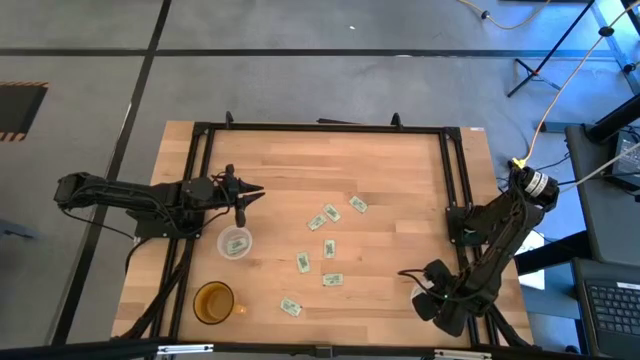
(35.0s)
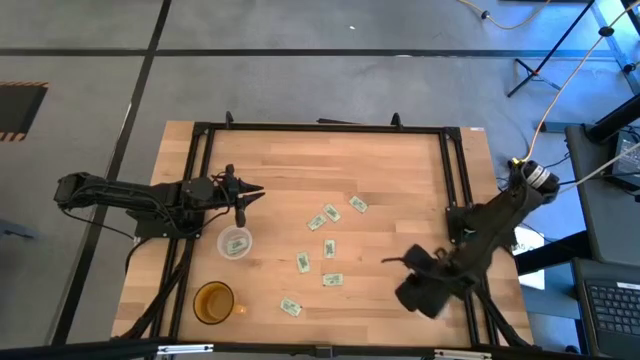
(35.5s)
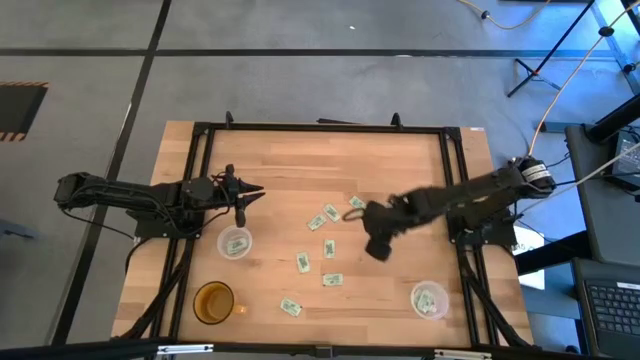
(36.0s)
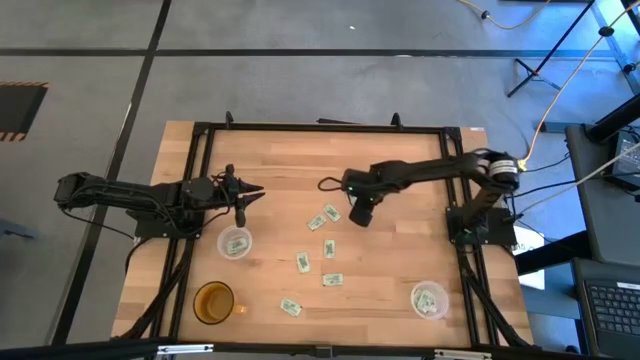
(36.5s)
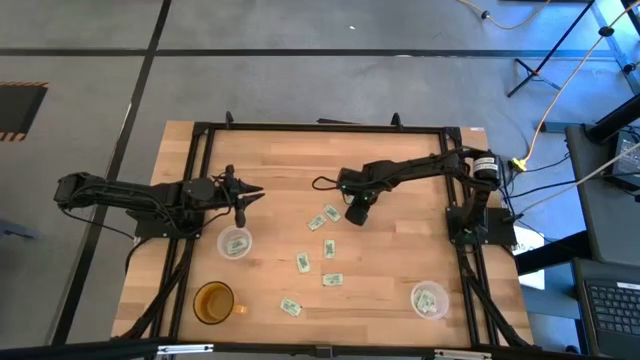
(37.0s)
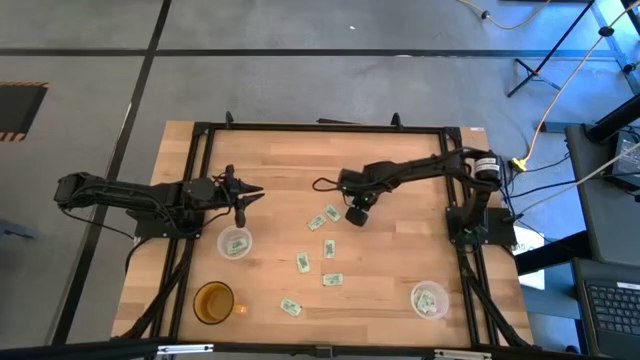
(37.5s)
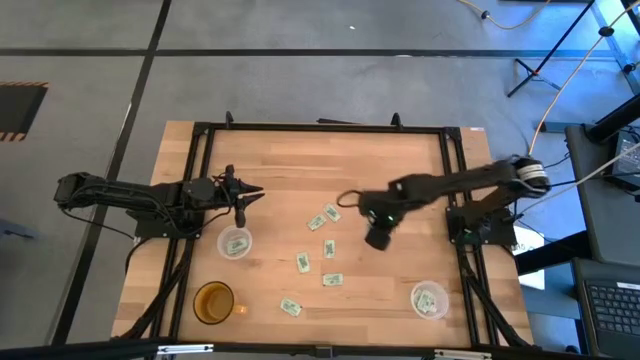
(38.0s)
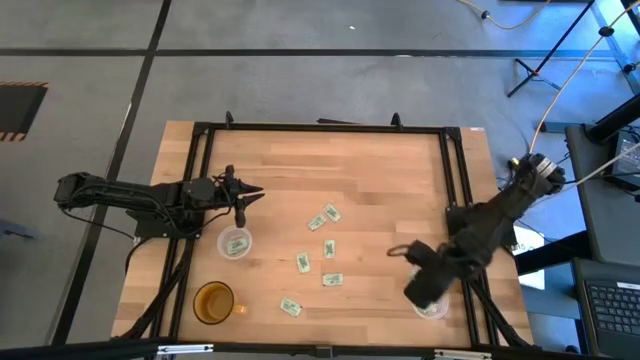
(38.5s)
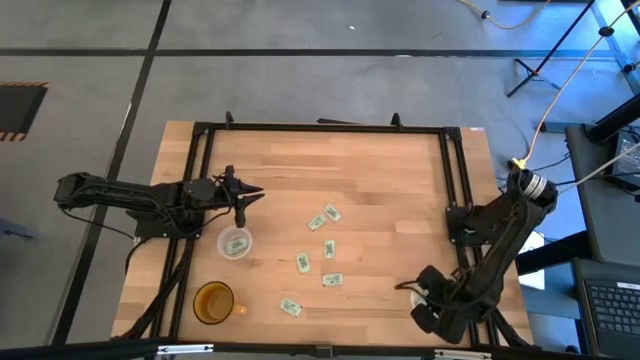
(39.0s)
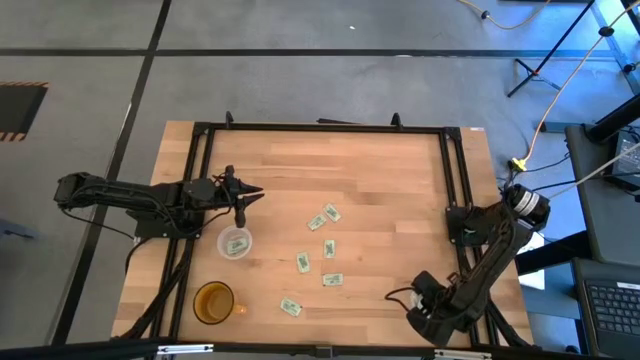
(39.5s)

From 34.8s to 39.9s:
Task: Pick and place items into bin
Put the green stevia packet into the right transparent bin

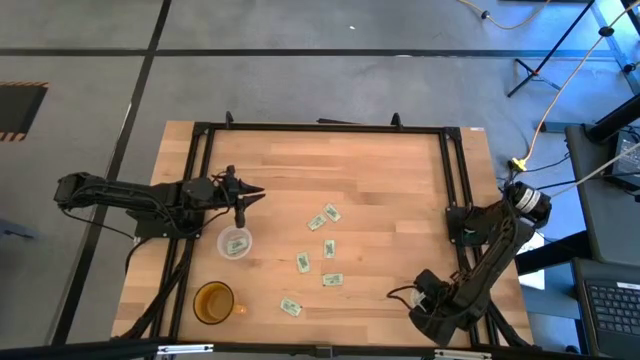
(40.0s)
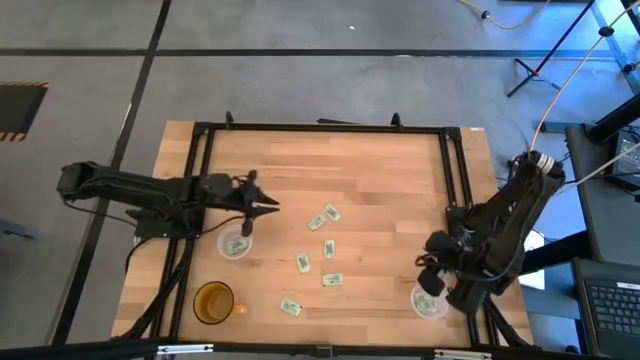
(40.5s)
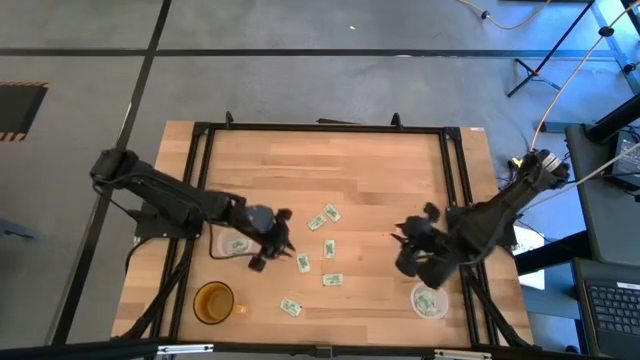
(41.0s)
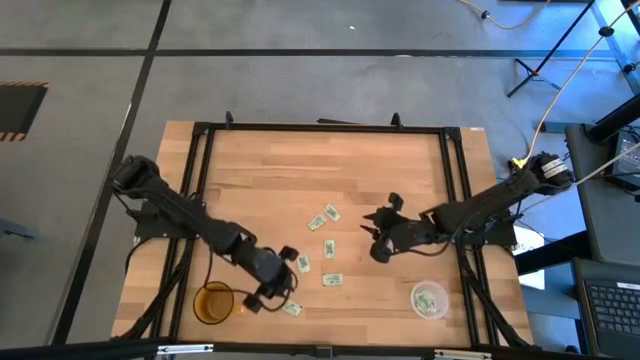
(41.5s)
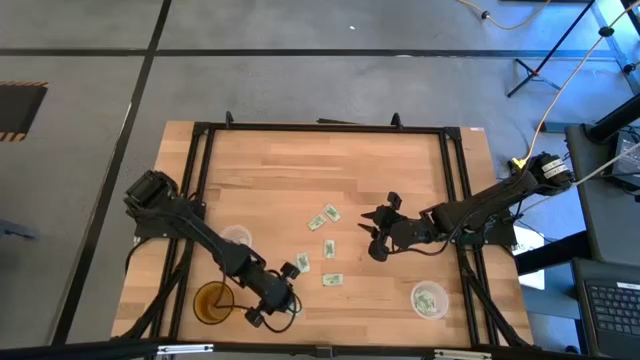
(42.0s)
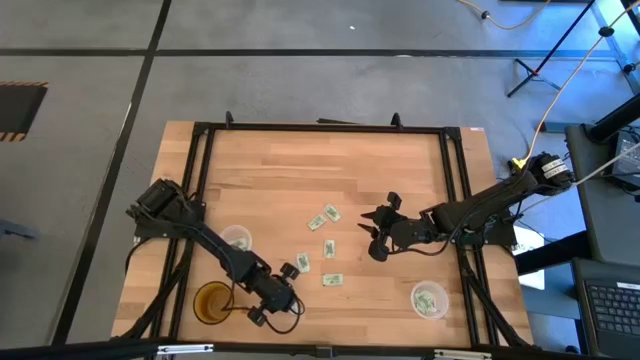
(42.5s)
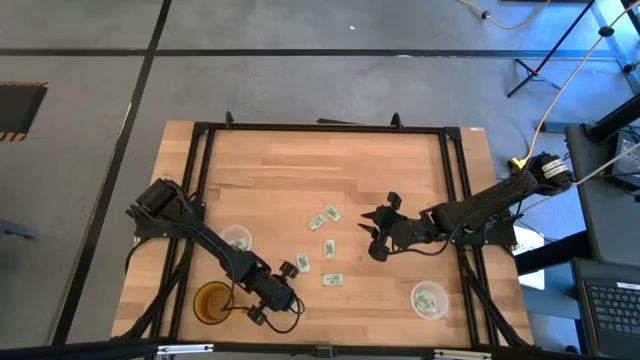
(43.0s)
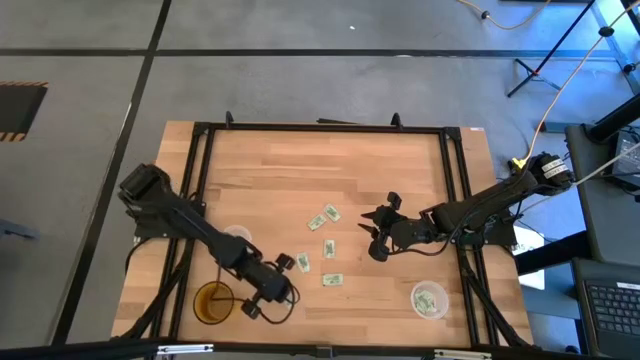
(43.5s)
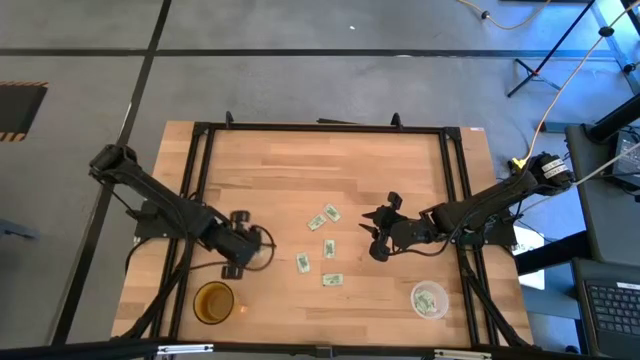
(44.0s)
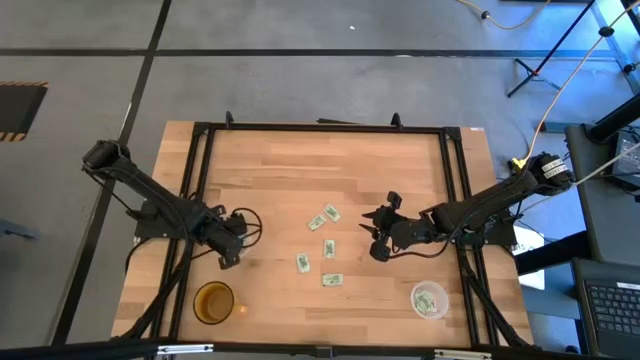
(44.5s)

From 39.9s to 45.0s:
Put the green stevia packet into the left transparent bin

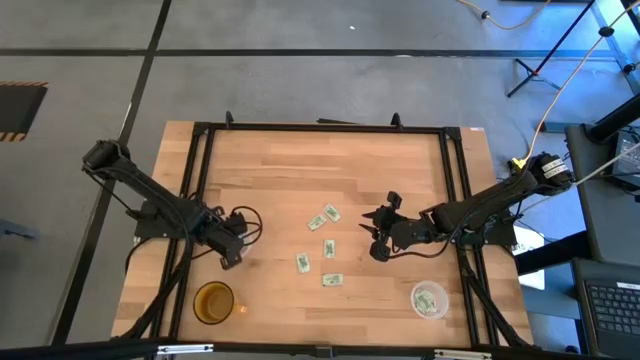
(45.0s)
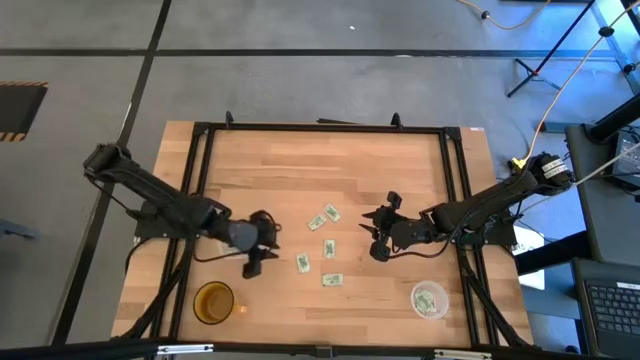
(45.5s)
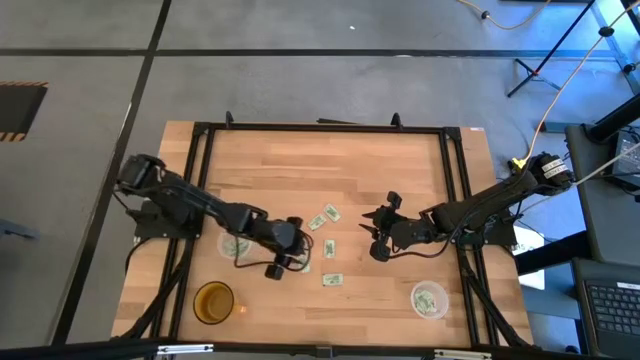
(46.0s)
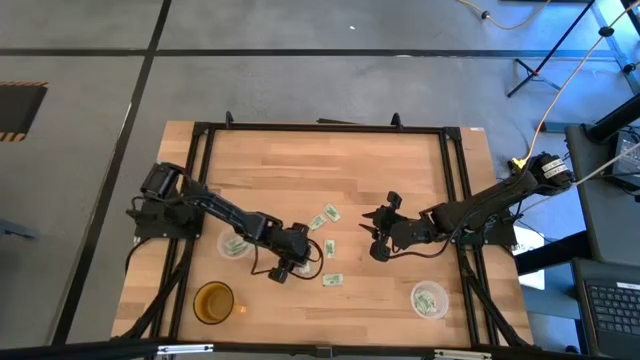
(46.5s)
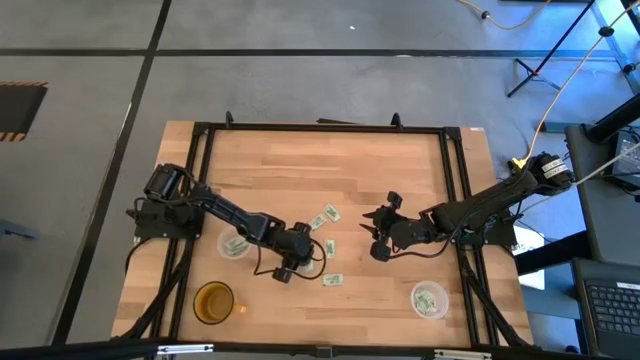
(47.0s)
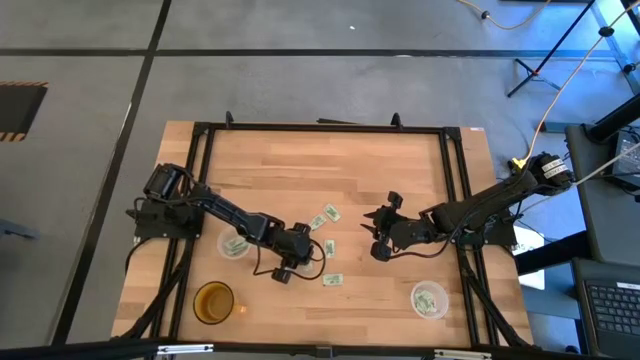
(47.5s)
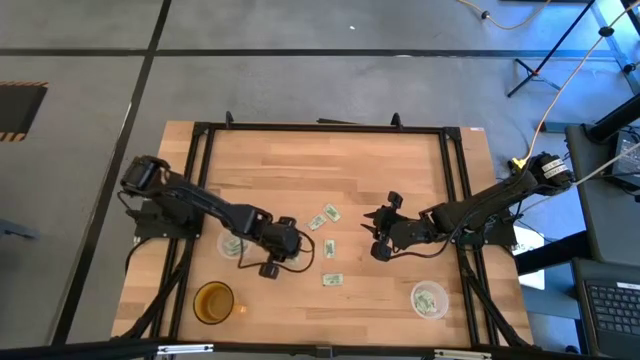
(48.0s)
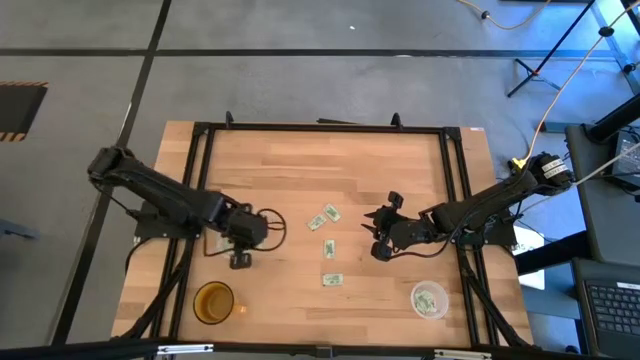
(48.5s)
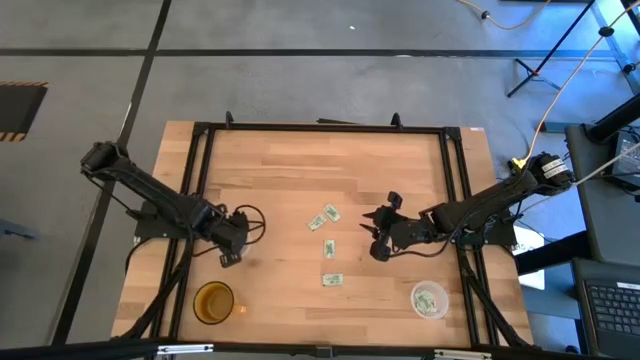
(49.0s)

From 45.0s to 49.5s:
Put the green stevia packet into the left transparent bin

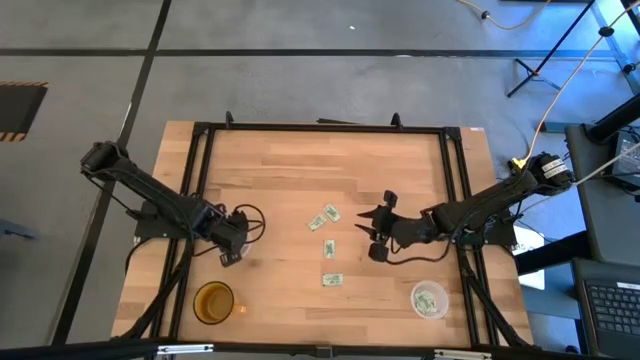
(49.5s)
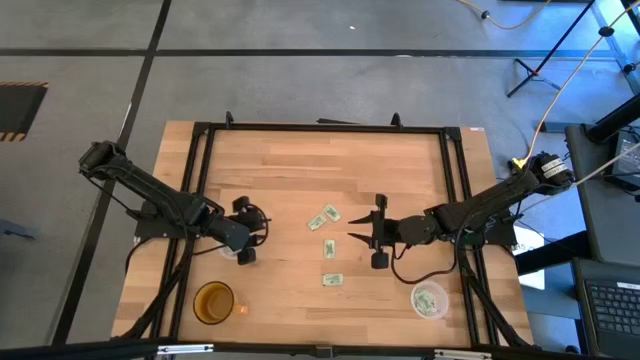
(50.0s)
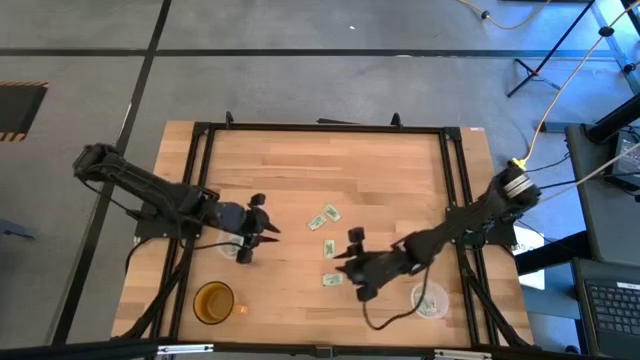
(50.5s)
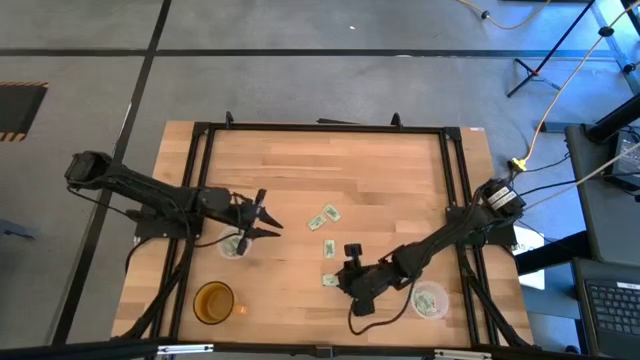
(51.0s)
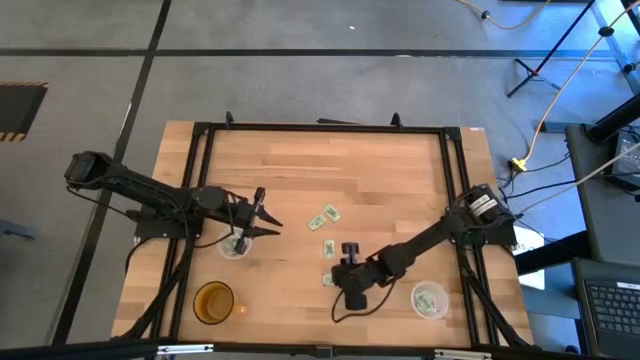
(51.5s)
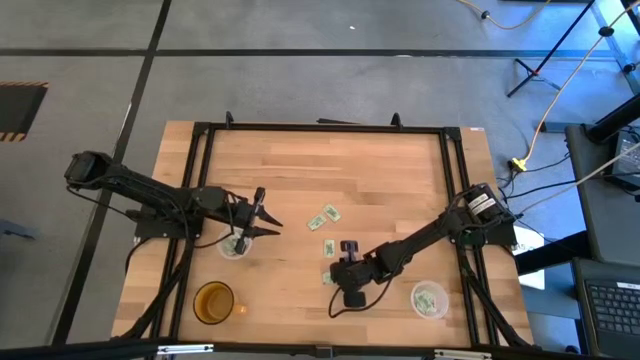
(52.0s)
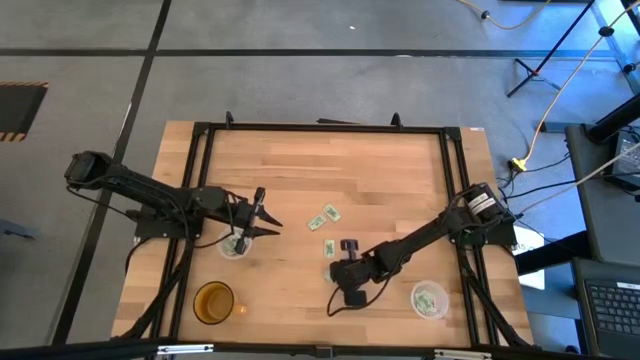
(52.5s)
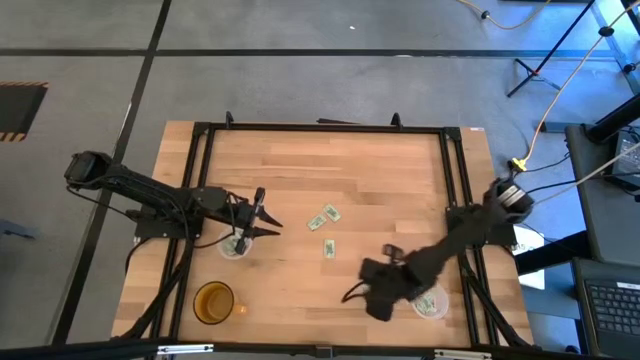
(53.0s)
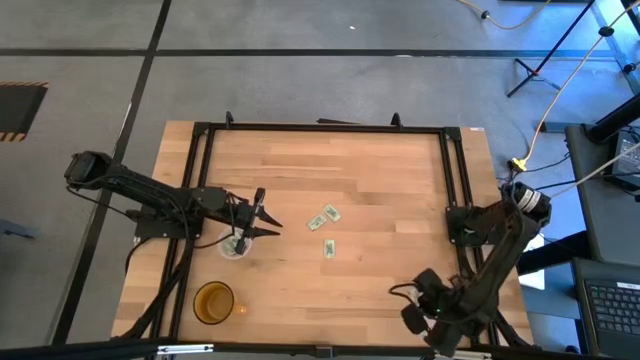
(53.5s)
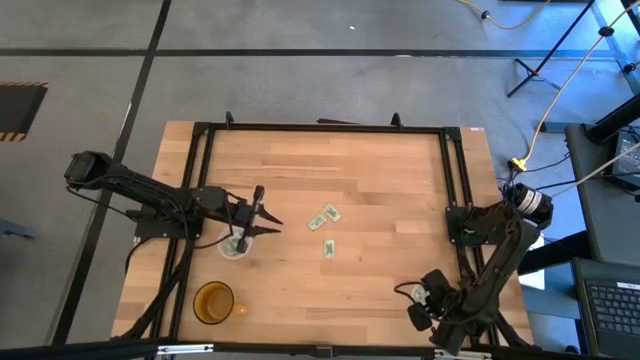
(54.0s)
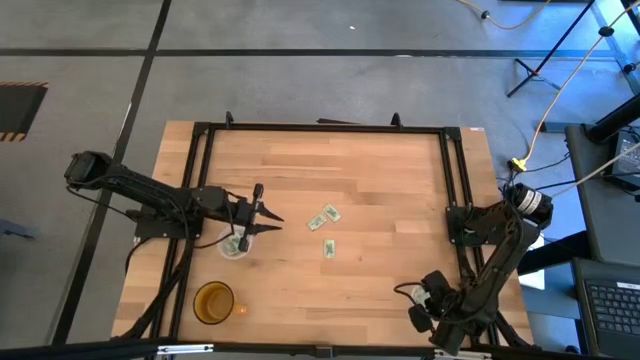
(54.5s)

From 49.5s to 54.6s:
Put the green stevia packet into the right transparent bin

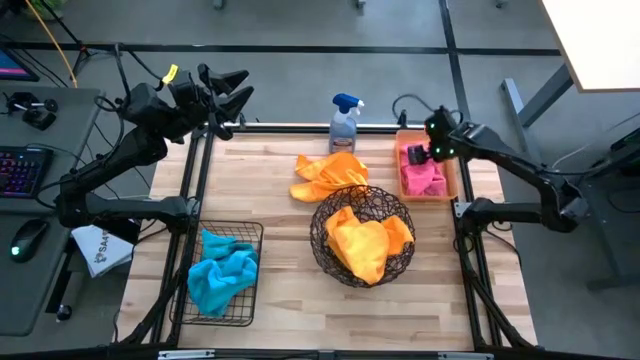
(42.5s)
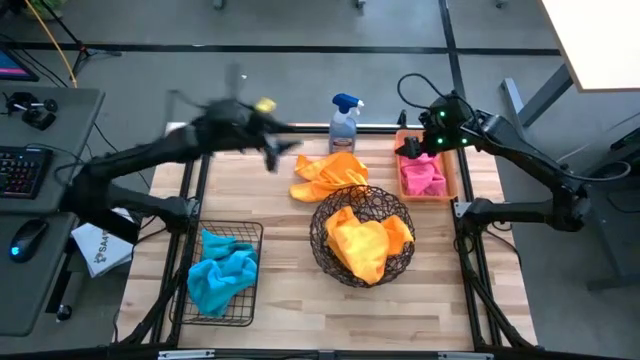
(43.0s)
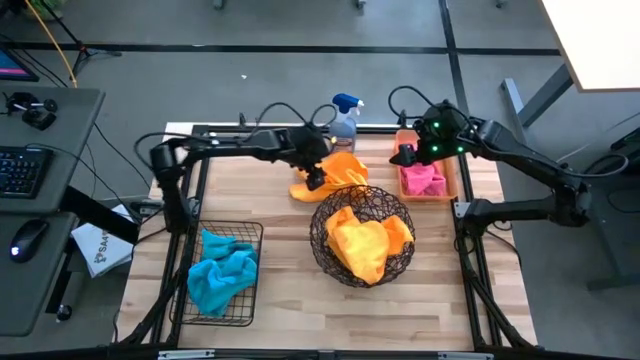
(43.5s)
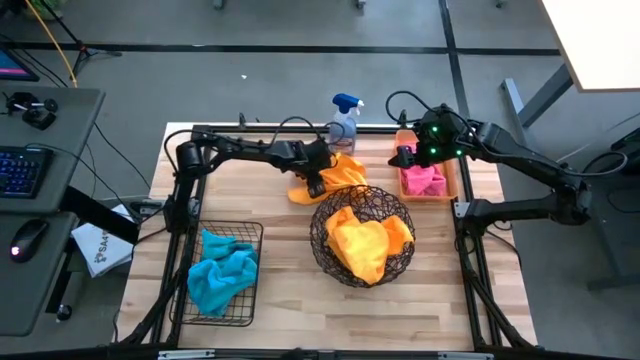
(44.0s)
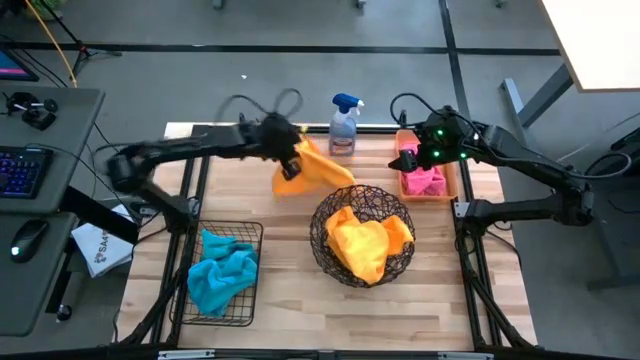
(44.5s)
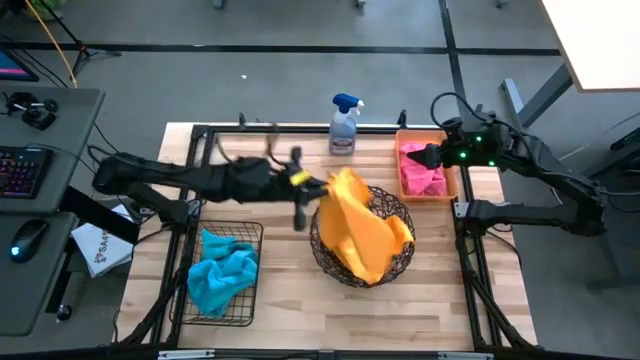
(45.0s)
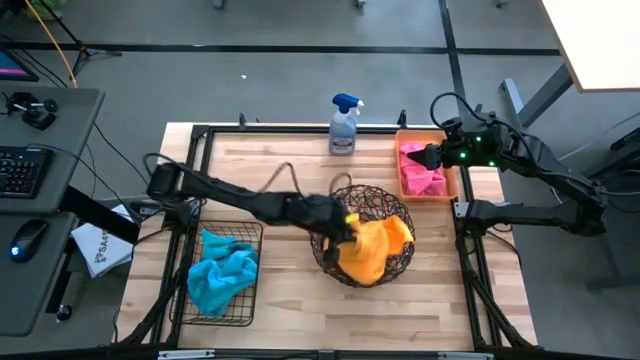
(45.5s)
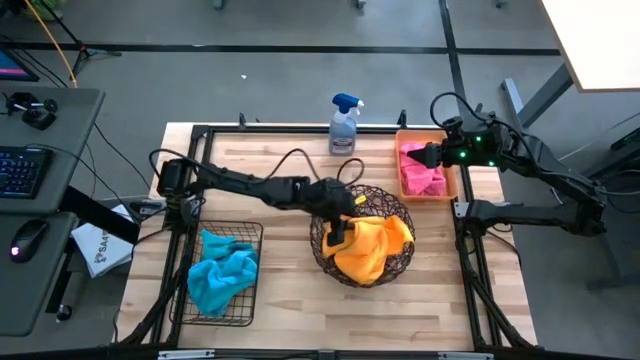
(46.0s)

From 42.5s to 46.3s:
Task: Sort microfiber towel by color & place in baskets
Put the orange microfiber towel into the woven basket
